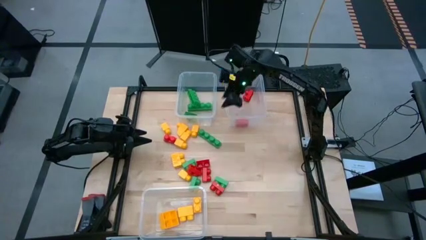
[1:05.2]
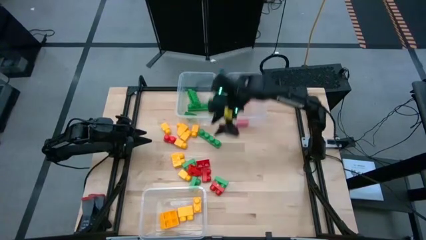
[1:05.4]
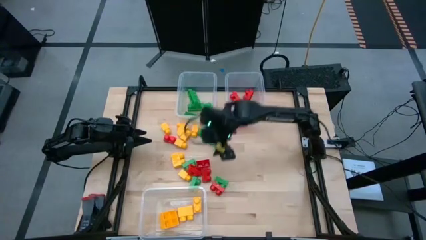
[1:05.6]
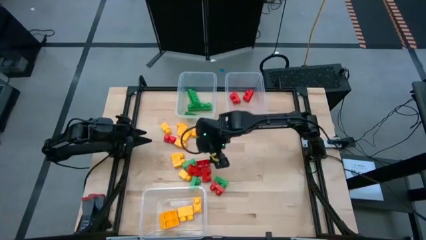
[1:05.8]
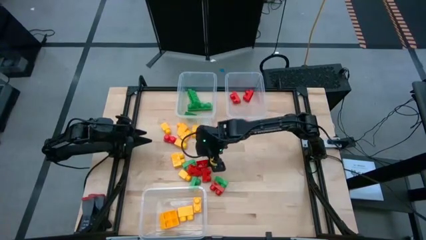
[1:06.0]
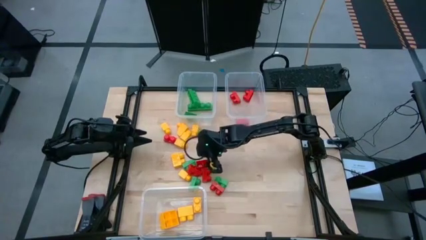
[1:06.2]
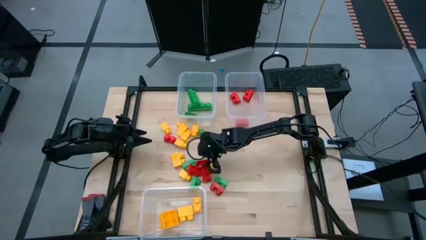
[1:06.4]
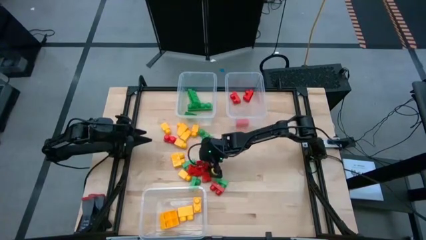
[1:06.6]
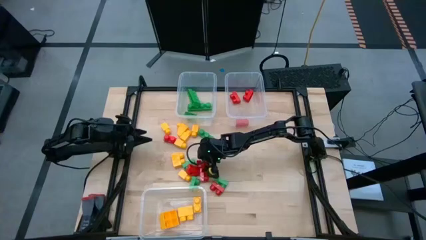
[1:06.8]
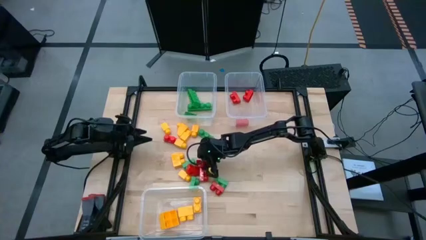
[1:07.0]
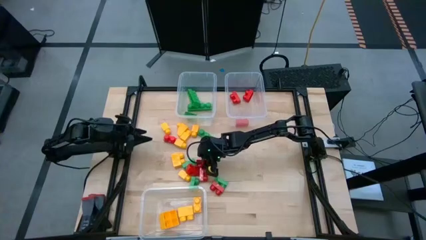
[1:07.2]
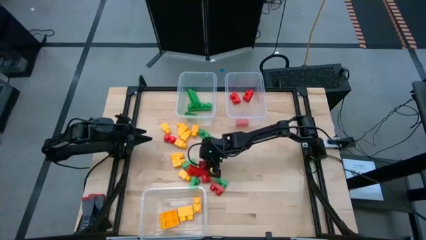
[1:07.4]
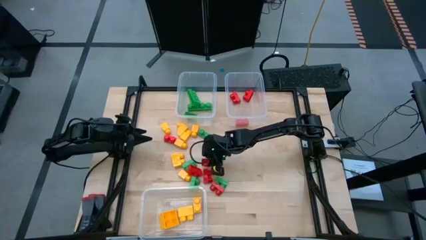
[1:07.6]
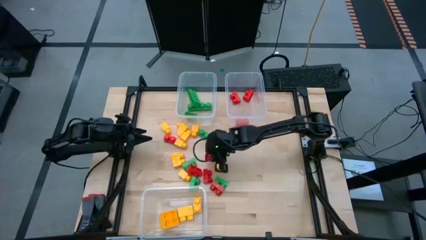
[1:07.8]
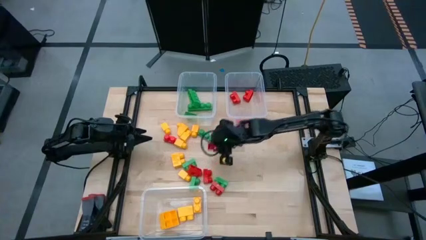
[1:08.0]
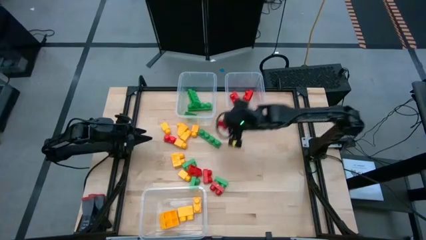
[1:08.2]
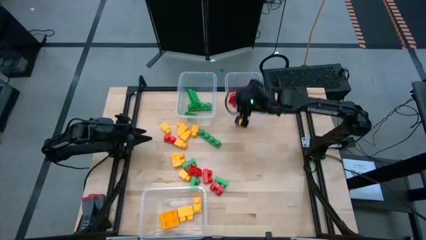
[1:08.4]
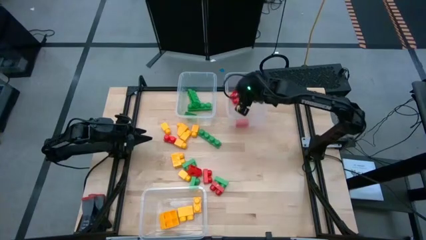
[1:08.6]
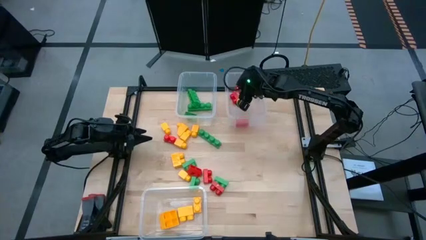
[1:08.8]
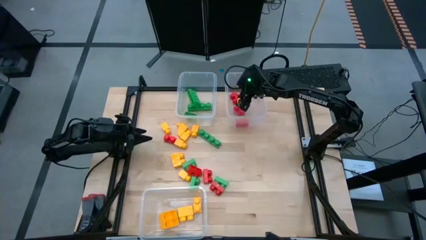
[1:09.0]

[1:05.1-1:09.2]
Task: Sort blocks
Put the red game piece into the top right transparent bin

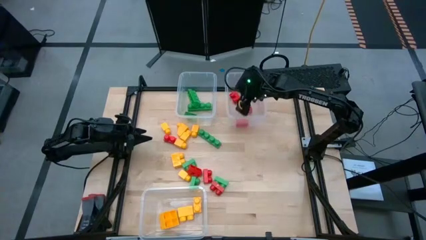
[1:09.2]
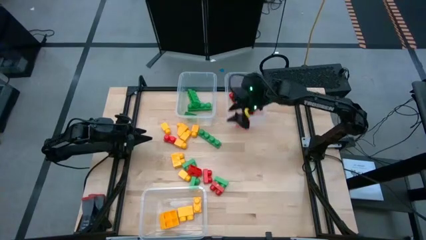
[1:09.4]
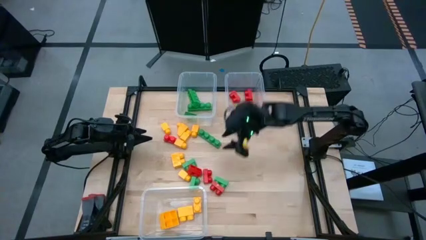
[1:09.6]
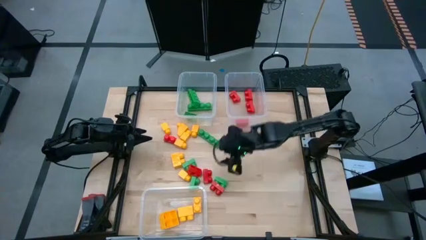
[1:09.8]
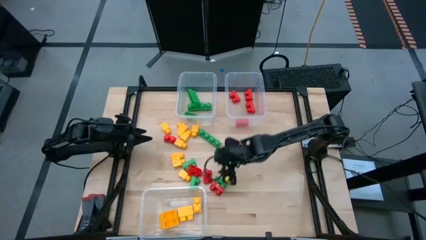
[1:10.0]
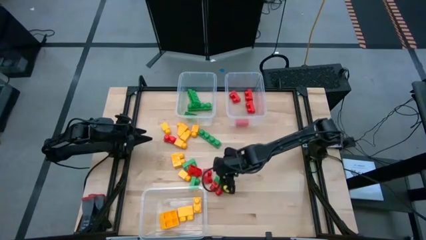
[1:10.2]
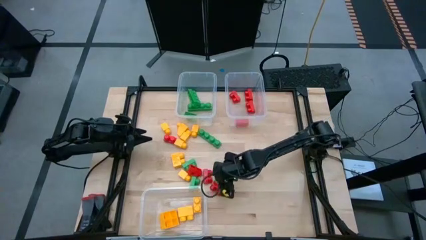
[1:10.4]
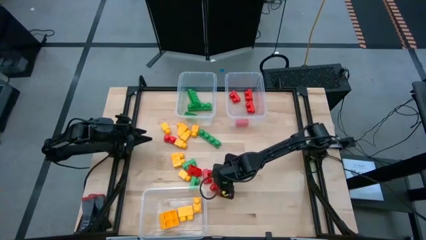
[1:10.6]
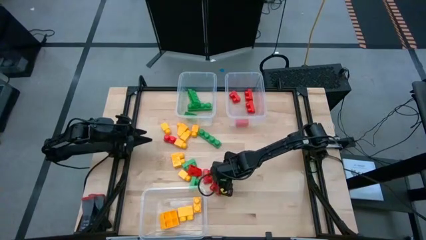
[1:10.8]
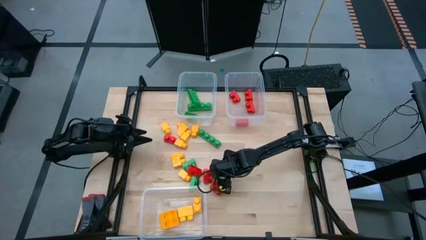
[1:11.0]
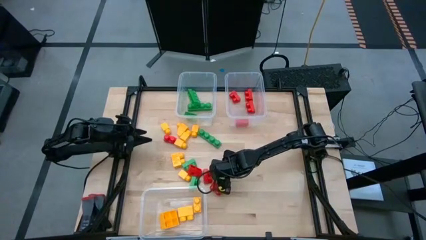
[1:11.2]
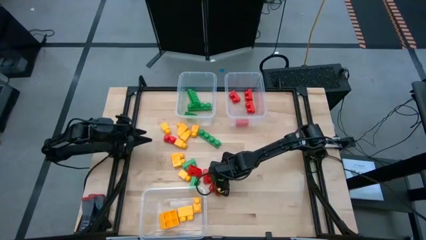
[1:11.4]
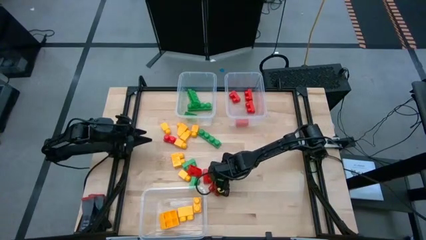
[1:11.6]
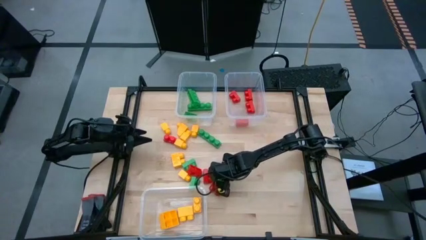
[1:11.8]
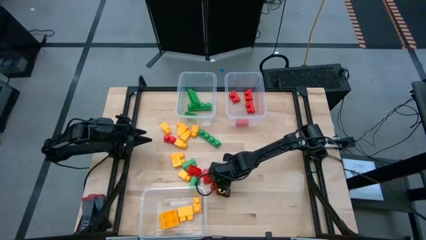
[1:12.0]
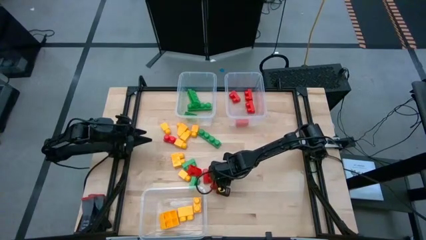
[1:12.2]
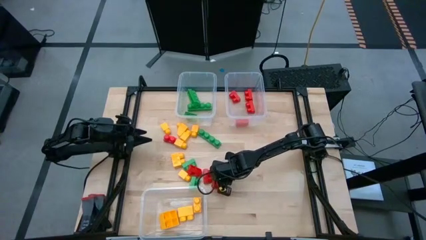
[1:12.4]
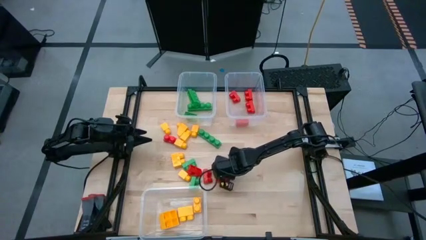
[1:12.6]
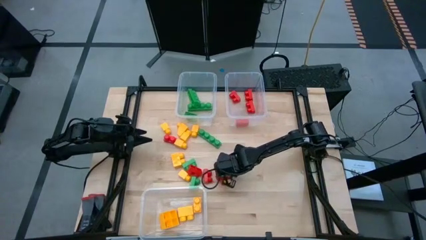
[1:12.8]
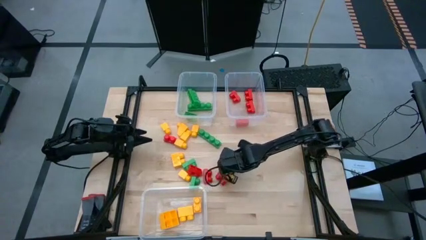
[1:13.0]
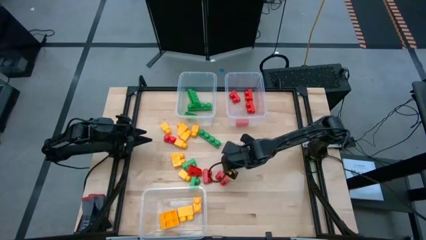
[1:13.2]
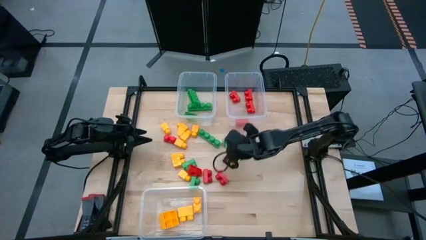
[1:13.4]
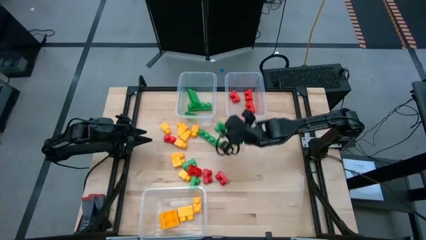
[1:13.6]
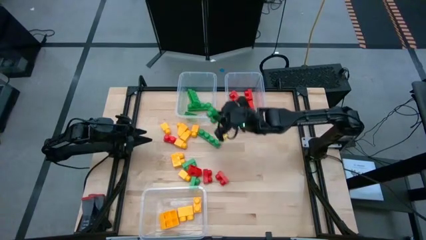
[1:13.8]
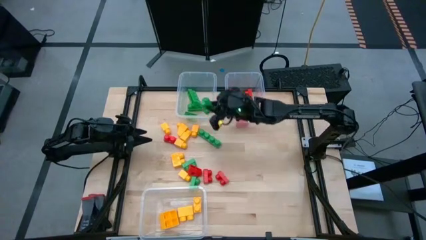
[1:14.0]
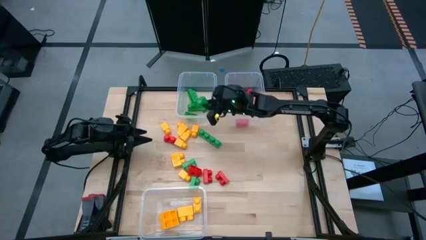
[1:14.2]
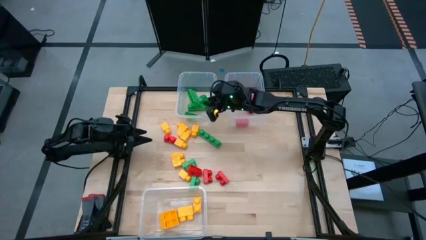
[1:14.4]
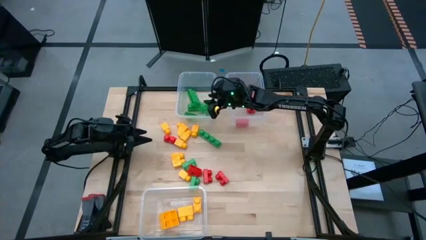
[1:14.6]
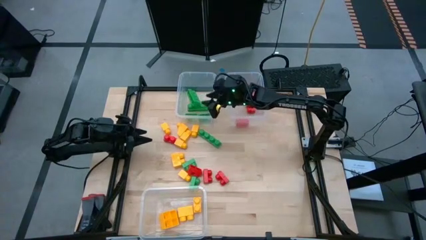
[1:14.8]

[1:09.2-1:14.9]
Put the green game piece into the top left transparent bin

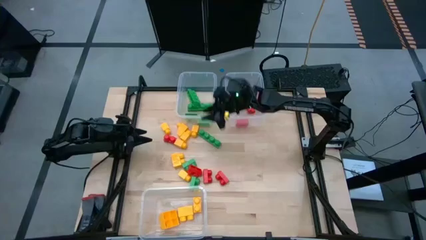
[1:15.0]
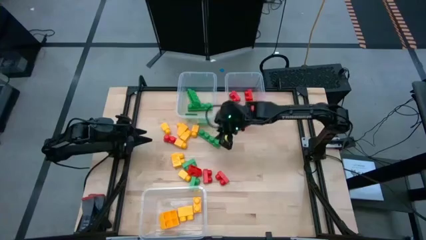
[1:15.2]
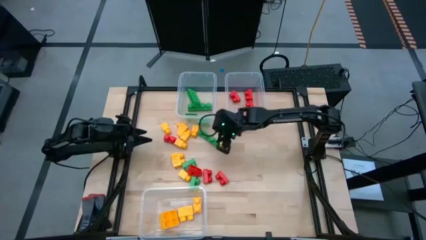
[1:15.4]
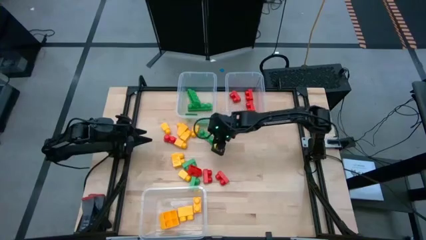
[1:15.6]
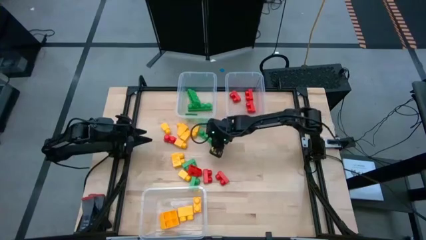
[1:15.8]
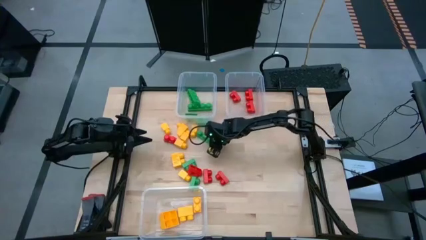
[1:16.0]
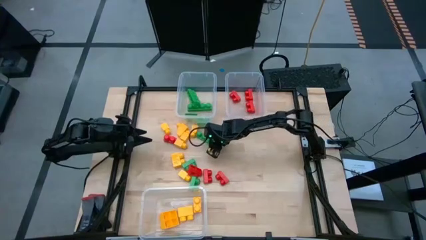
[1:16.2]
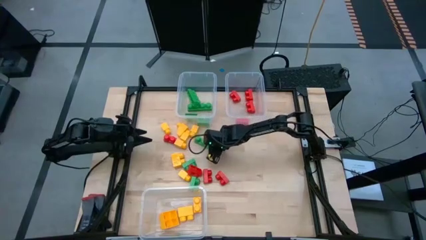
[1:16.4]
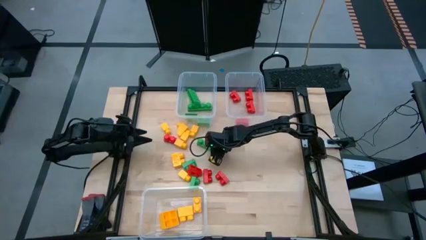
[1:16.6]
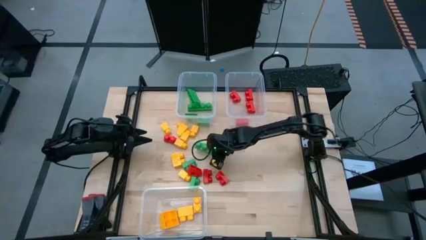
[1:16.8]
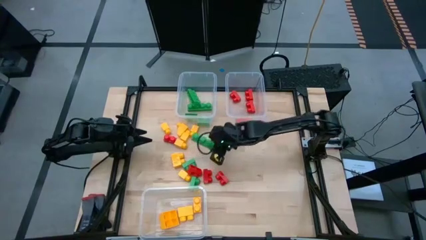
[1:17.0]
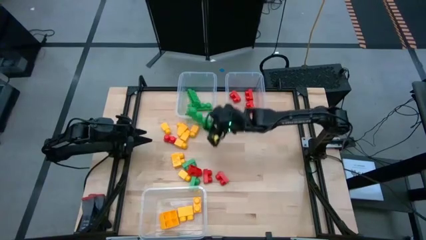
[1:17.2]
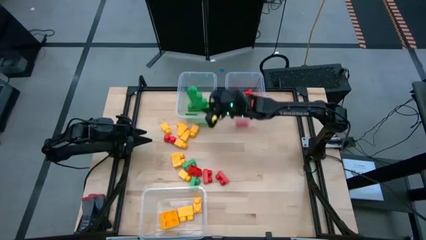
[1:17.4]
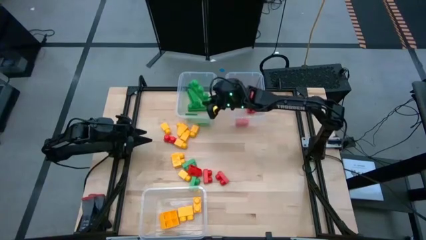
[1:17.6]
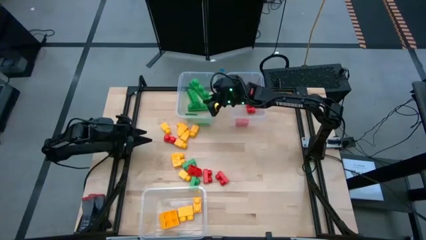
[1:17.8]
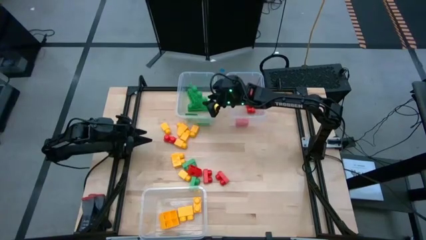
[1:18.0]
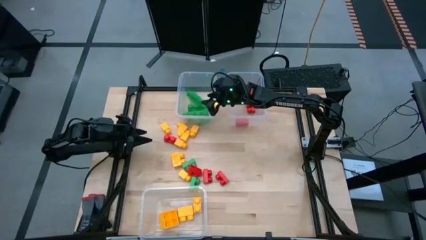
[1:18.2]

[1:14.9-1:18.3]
Put the green game piece into the top left transparent bin

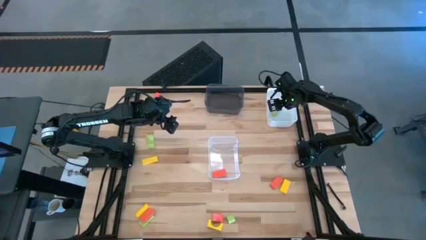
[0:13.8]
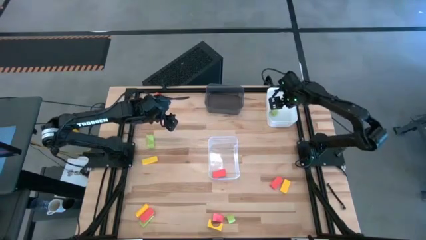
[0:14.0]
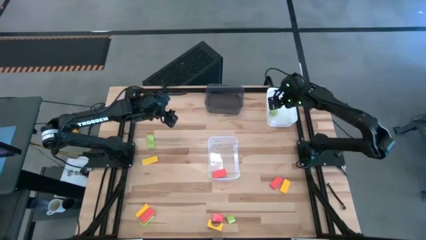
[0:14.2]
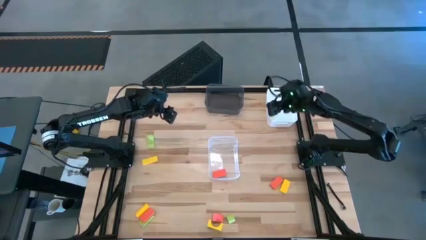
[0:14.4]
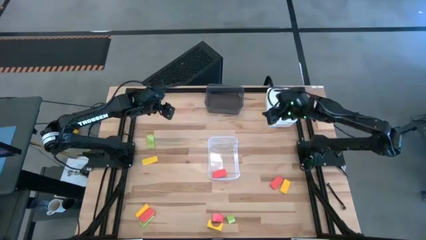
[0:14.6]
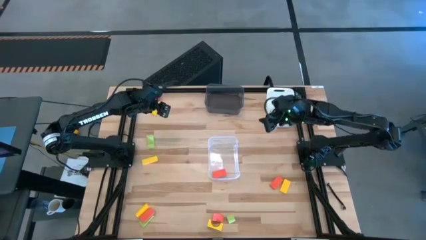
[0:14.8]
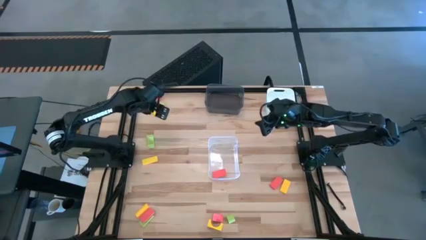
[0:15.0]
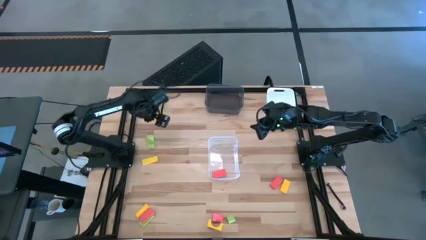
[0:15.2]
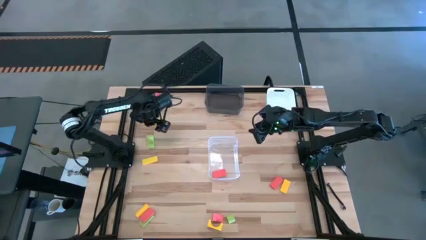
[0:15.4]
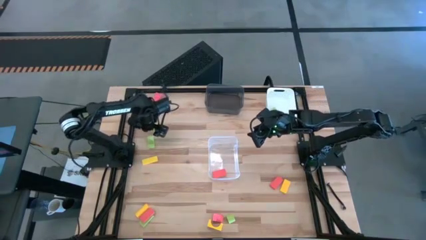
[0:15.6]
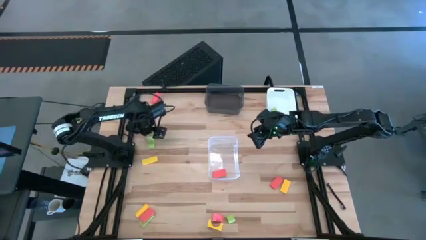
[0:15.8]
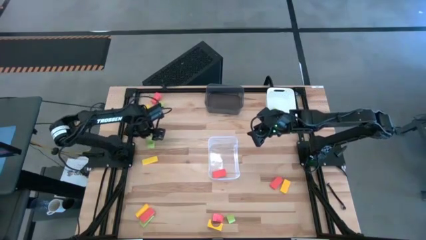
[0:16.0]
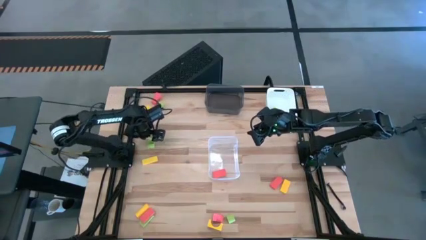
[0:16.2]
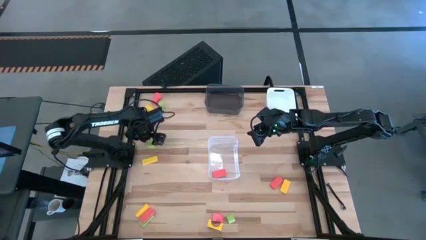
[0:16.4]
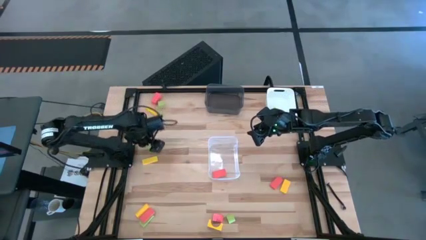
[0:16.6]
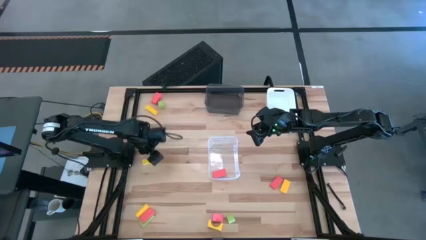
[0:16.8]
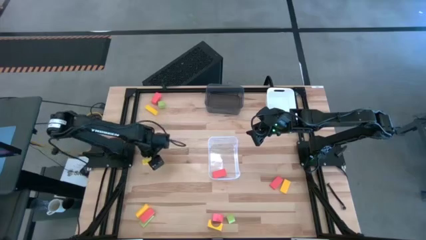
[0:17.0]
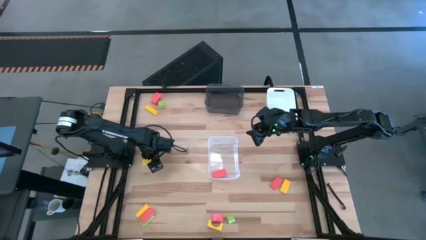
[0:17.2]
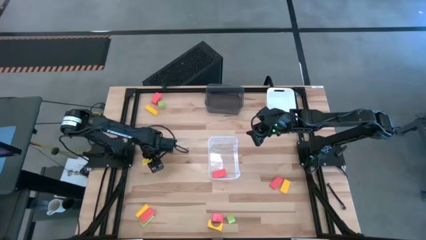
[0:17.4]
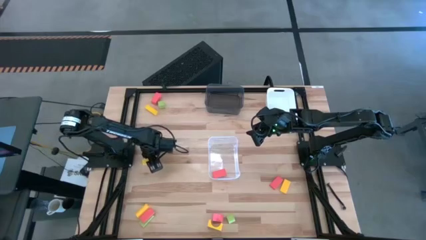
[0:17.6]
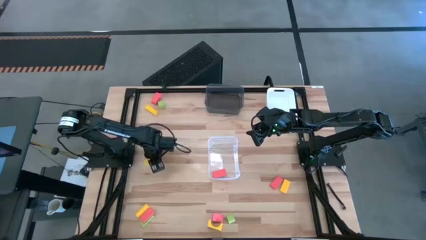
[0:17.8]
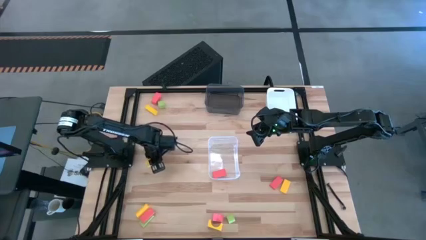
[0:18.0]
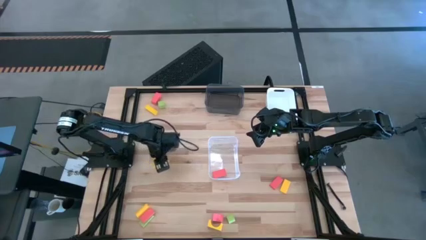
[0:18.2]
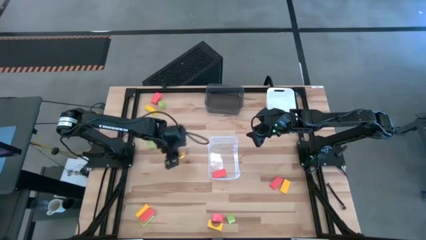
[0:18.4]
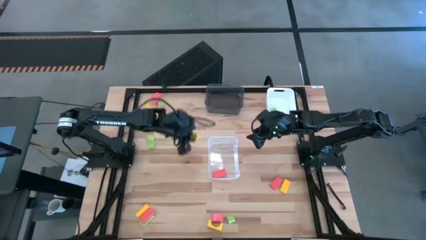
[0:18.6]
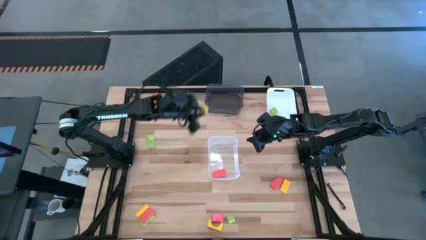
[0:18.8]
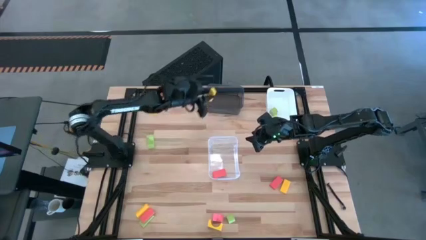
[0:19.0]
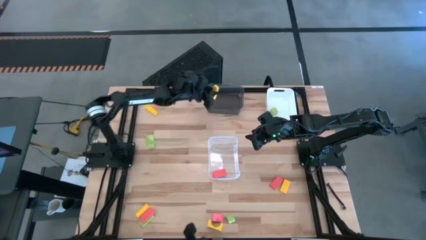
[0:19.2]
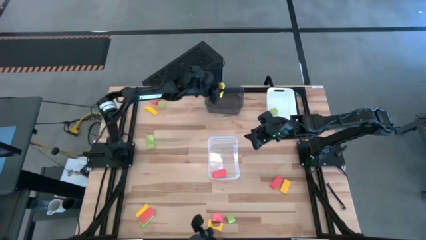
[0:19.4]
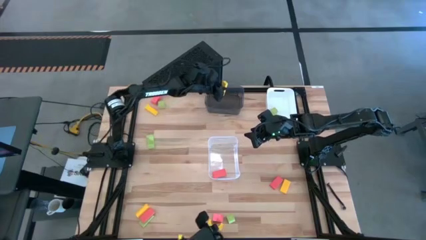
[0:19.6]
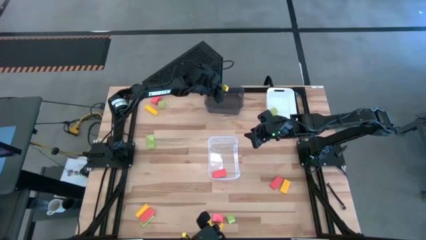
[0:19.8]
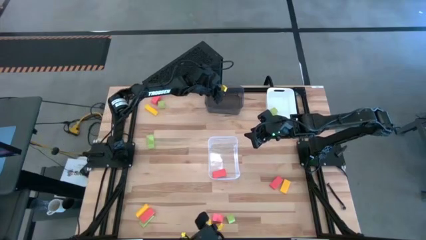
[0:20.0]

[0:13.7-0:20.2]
Task: Sort & place blocks by color
Put the yellow block into the black bin
